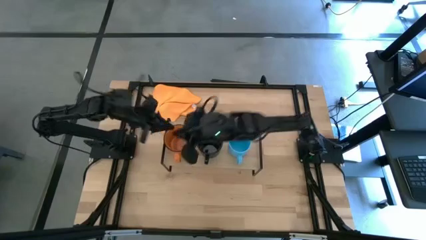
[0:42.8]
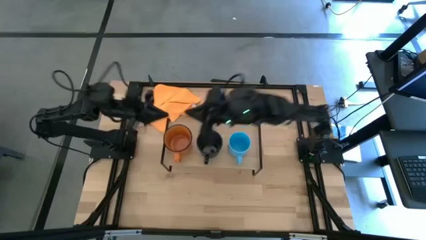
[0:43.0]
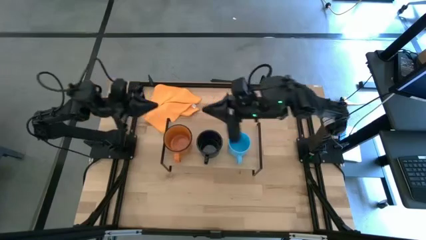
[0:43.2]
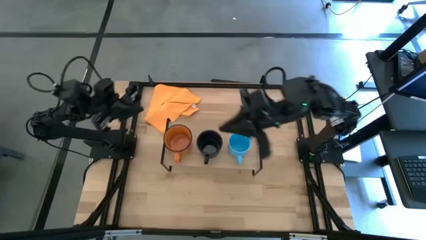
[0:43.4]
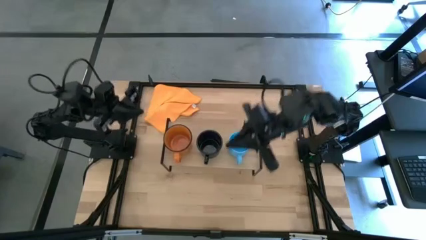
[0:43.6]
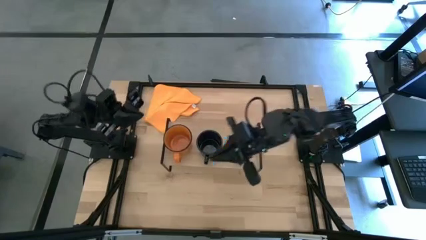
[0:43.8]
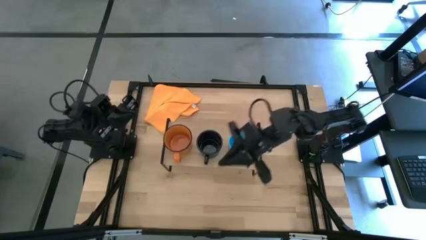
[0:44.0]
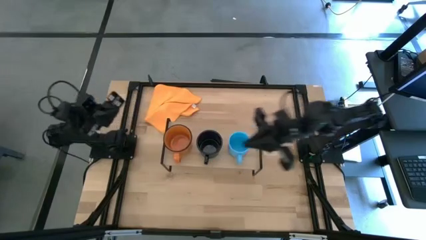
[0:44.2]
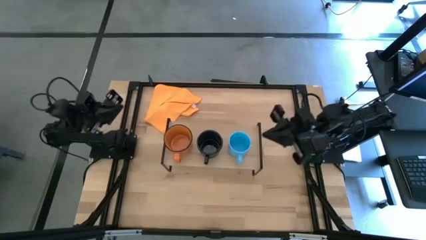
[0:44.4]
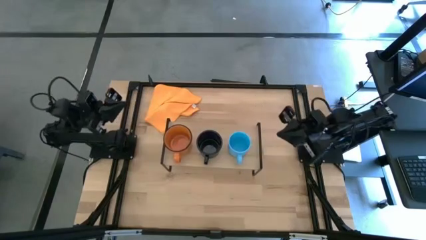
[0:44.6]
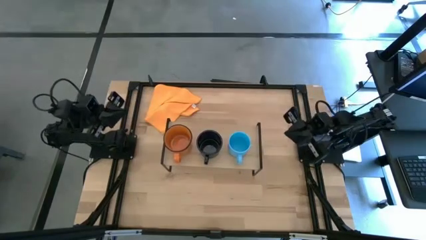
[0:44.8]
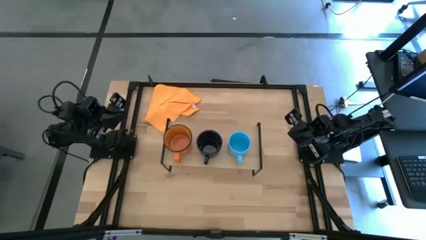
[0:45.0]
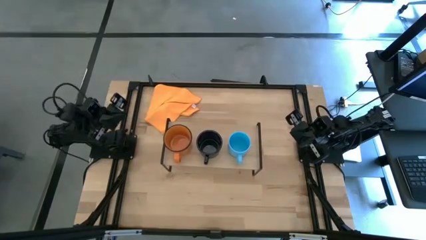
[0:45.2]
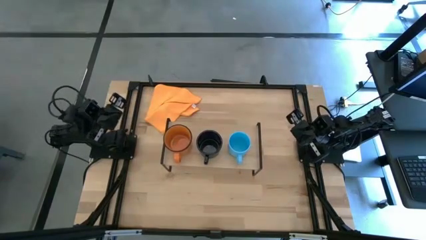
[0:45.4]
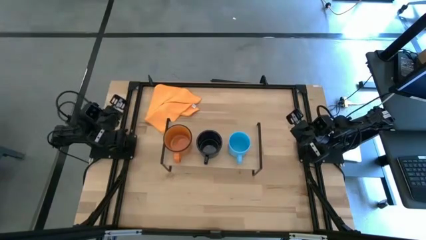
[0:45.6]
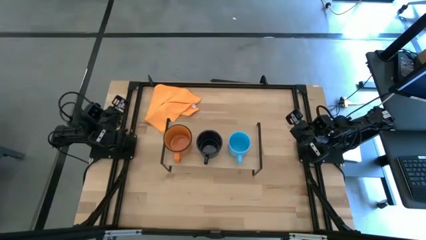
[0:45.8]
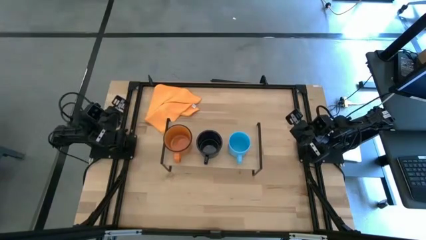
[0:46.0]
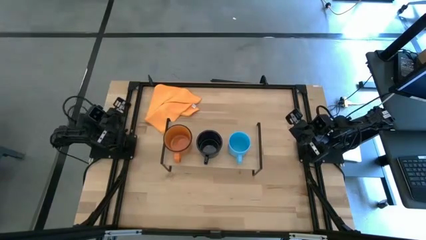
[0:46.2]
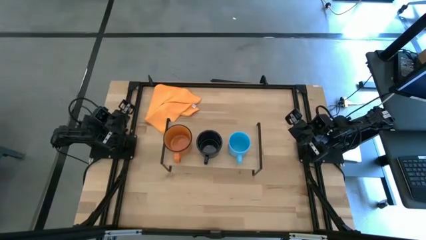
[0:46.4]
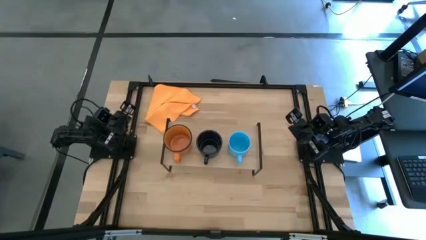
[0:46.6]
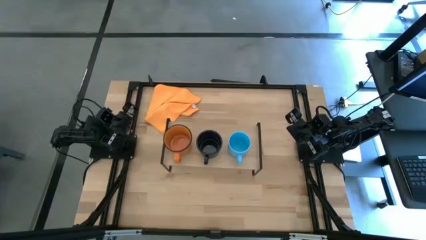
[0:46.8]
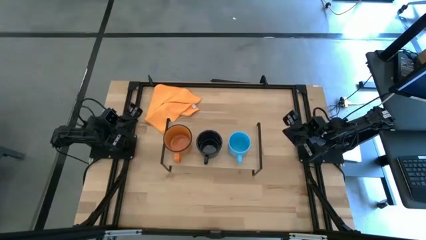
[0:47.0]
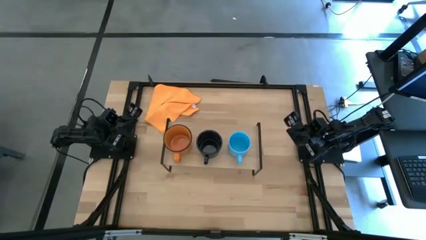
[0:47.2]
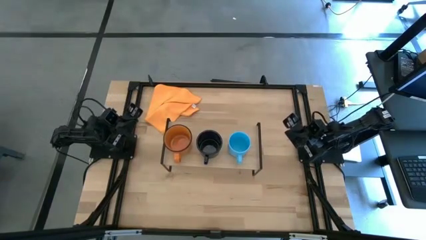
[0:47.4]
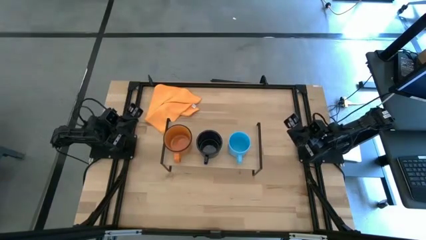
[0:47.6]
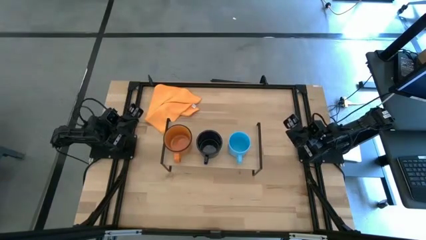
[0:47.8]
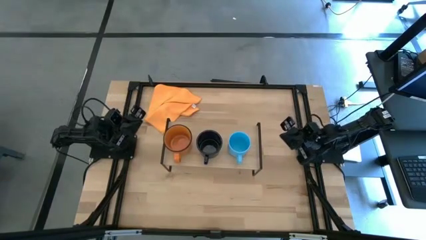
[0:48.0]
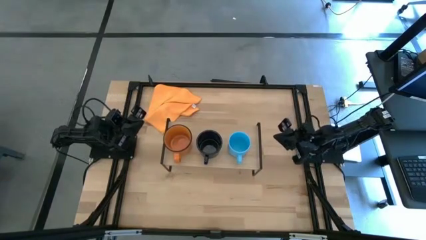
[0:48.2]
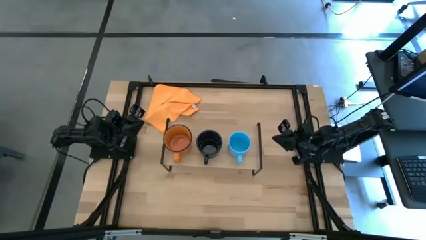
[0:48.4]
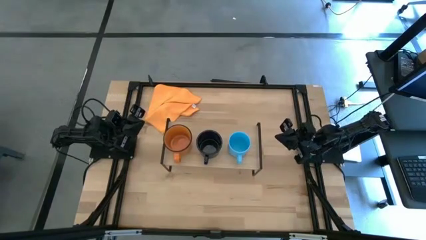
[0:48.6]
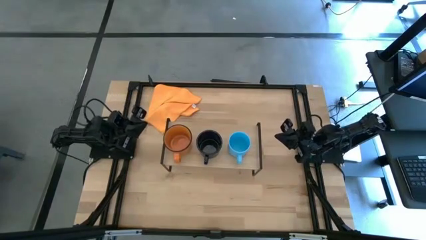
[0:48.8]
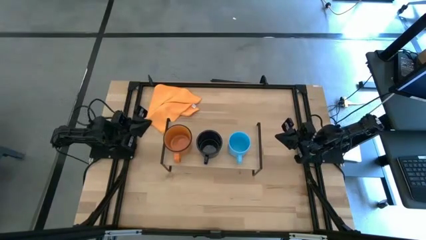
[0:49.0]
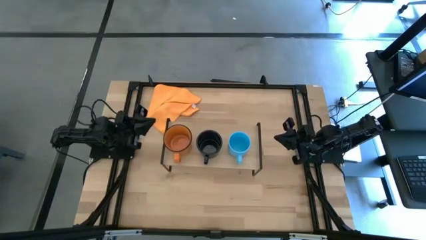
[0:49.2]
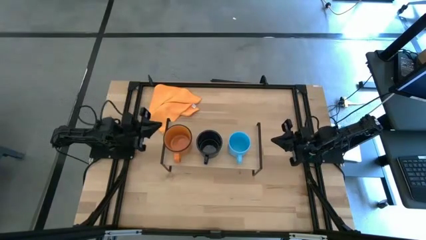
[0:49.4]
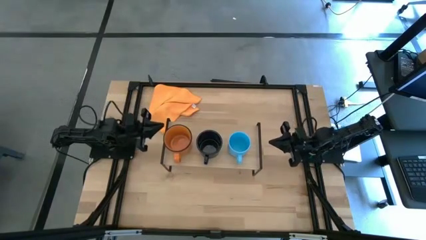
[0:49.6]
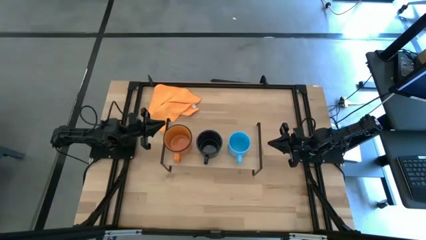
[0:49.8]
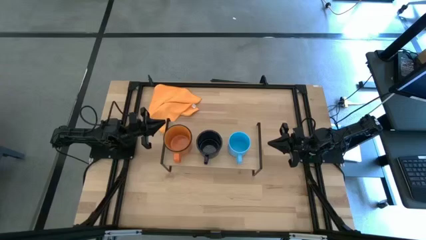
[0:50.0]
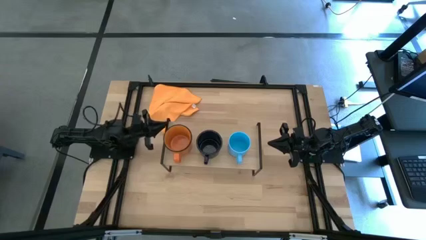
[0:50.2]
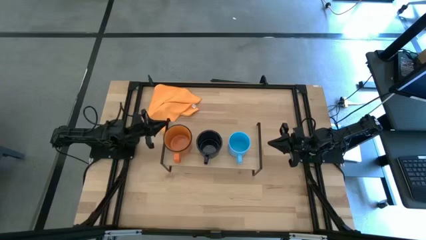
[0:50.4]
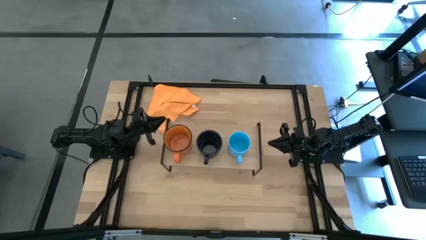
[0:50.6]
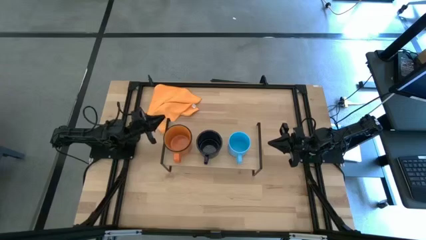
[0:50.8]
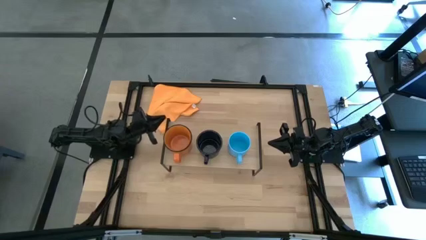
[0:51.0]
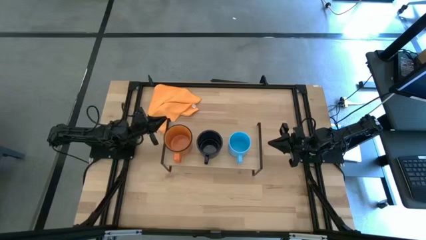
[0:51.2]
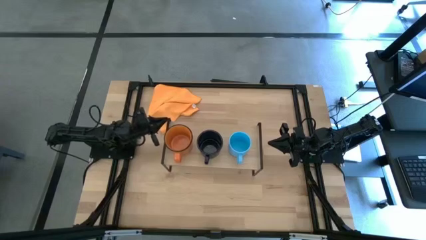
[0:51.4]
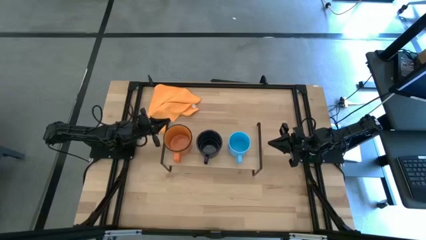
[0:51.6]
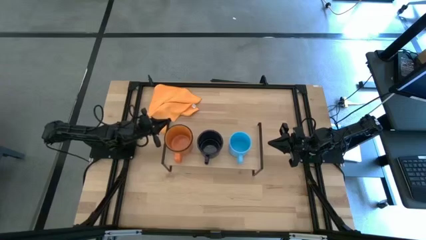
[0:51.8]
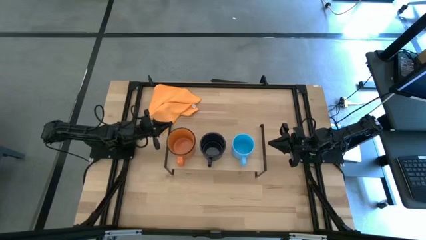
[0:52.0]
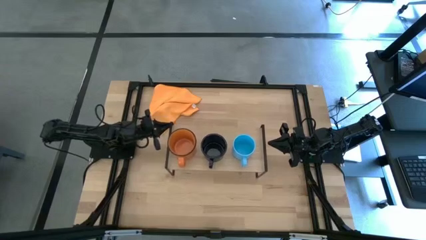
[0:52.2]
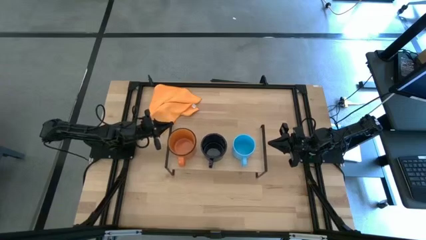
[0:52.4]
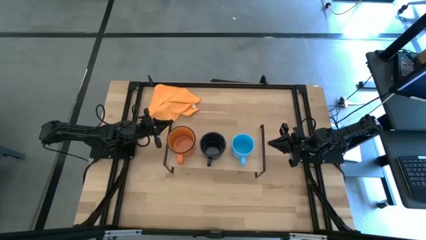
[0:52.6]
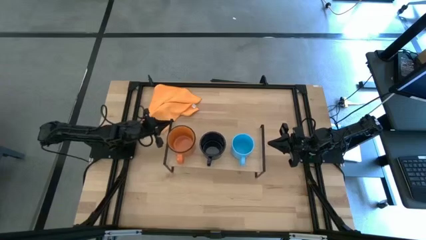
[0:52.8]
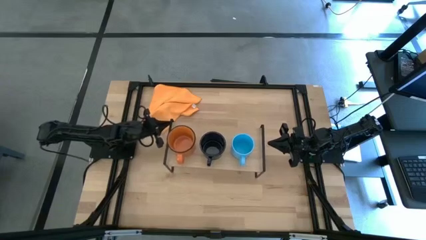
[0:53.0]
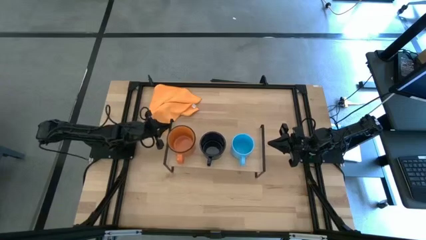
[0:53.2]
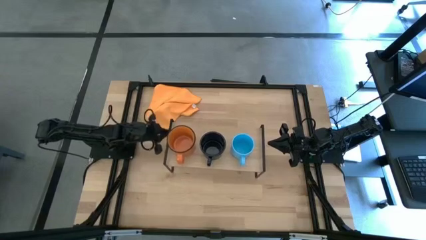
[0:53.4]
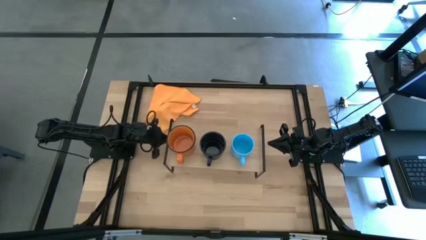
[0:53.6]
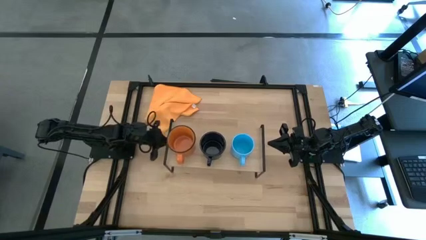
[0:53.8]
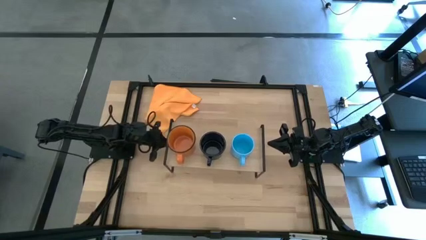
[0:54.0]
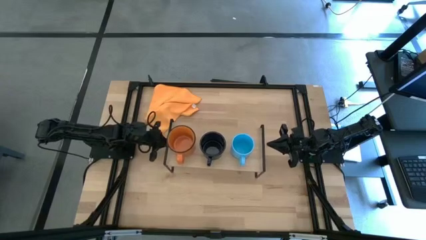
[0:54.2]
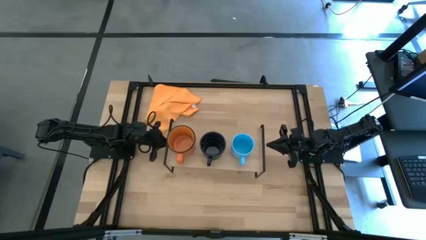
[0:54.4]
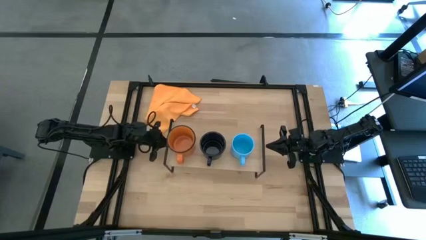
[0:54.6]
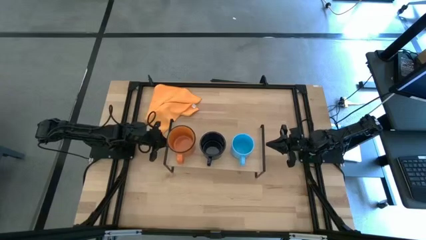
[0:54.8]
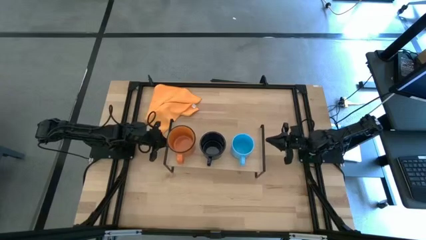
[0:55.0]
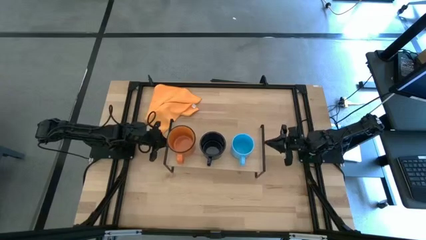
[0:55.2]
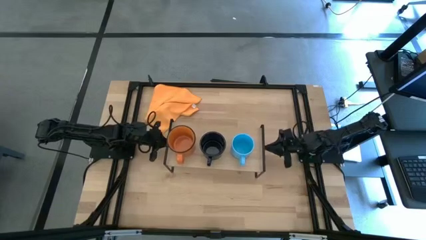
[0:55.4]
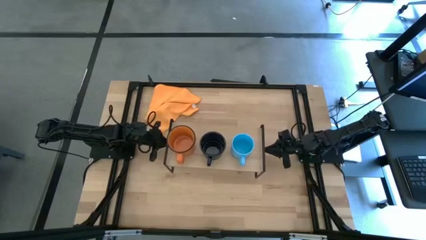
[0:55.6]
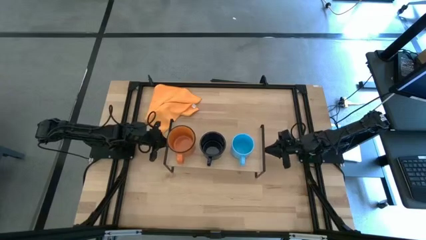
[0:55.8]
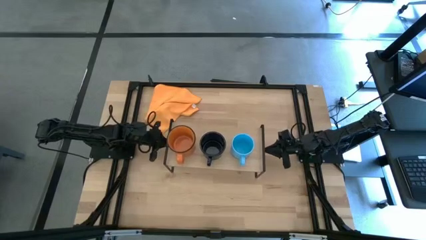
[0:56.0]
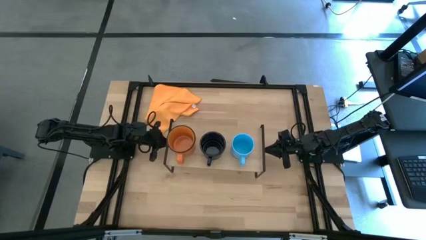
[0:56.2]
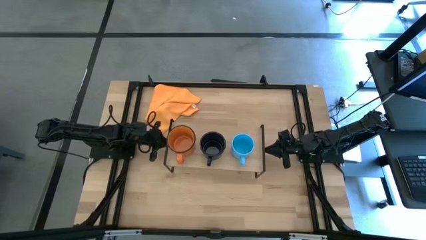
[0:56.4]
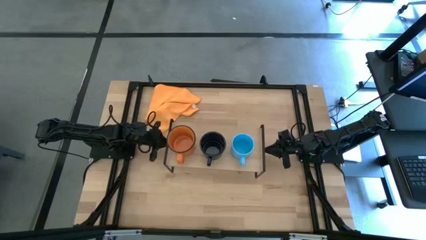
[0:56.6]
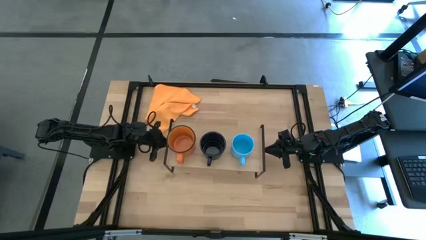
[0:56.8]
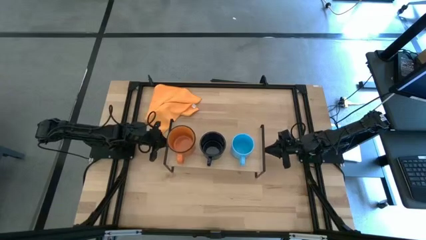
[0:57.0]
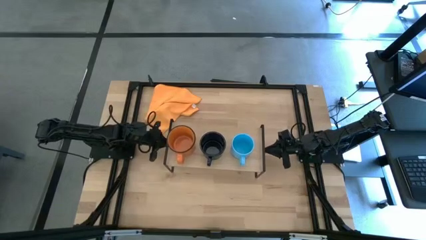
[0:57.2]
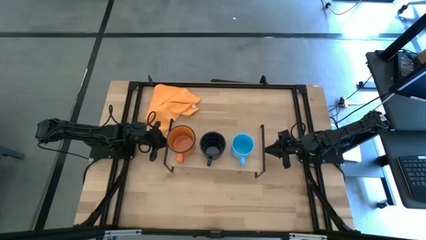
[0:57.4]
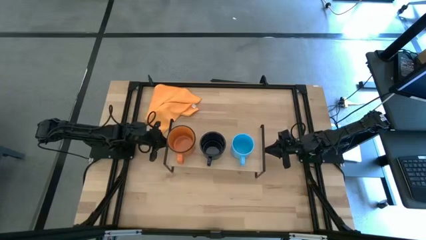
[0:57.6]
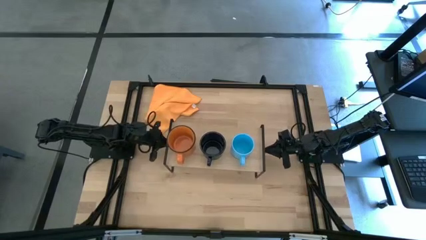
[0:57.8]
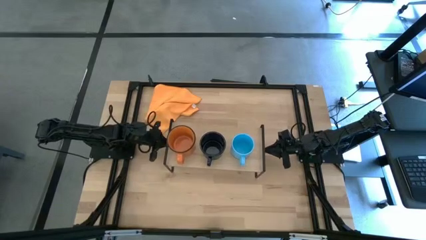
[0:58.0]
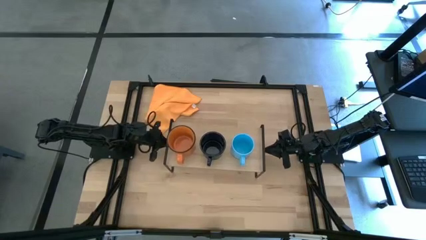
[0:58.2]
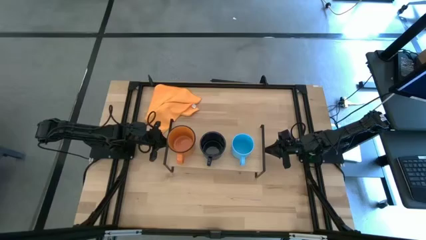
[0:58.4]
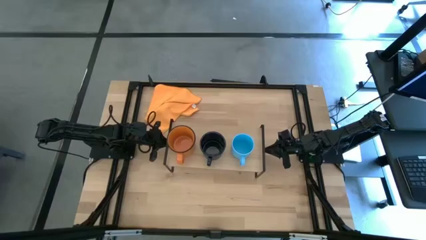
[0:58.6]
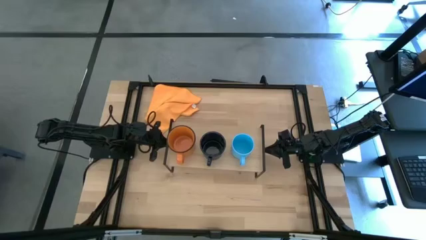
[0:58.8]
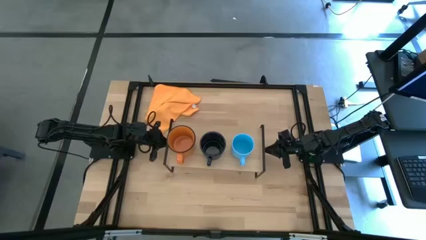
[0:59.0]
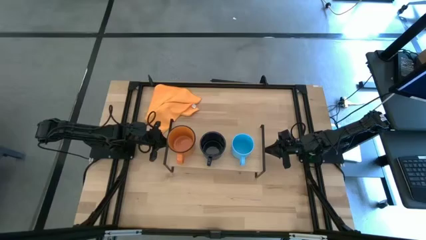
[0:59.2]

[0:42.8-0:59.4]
Task: Stack small to large cups/mugs on shelf
Return to Home Position
